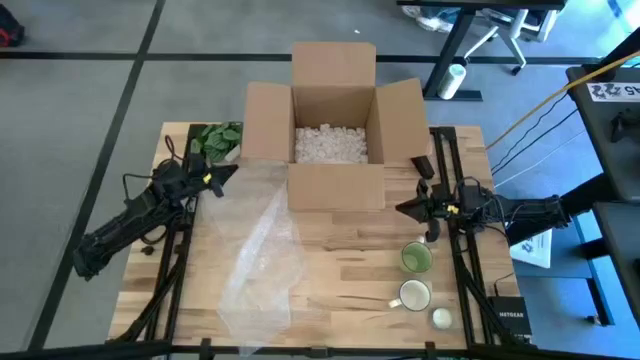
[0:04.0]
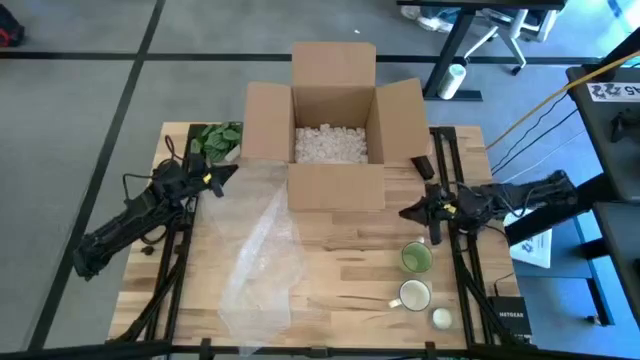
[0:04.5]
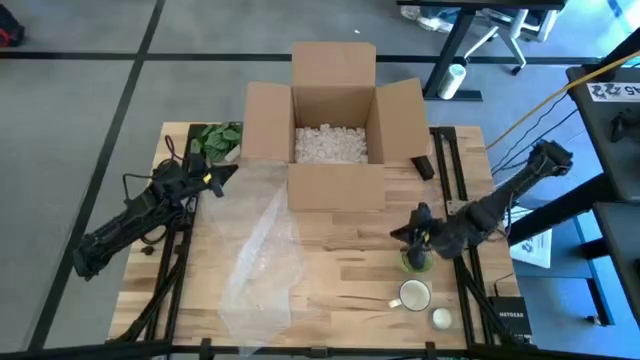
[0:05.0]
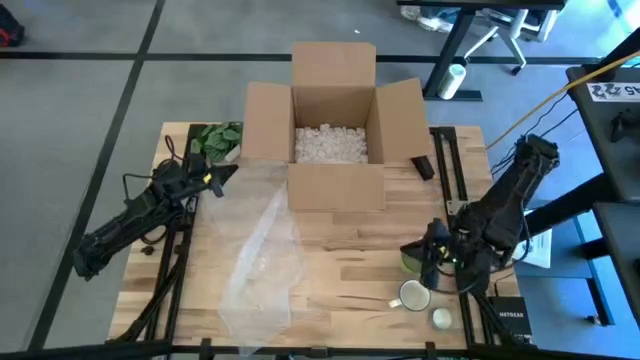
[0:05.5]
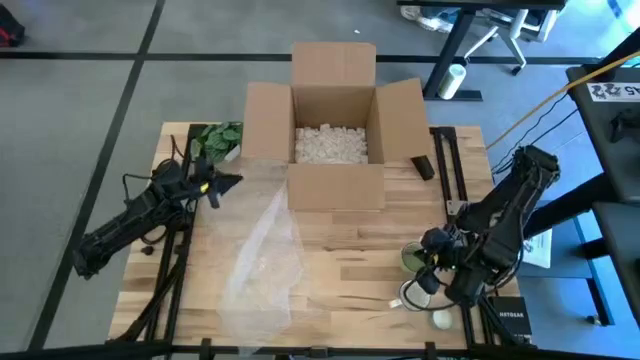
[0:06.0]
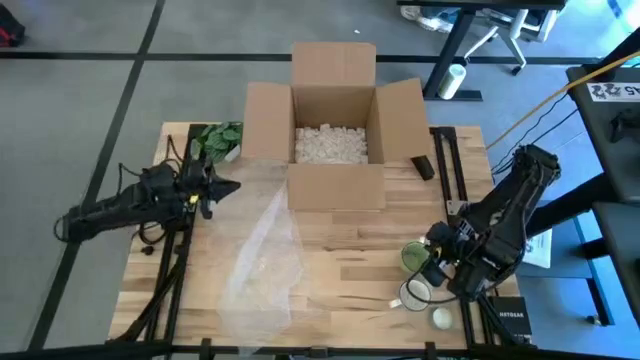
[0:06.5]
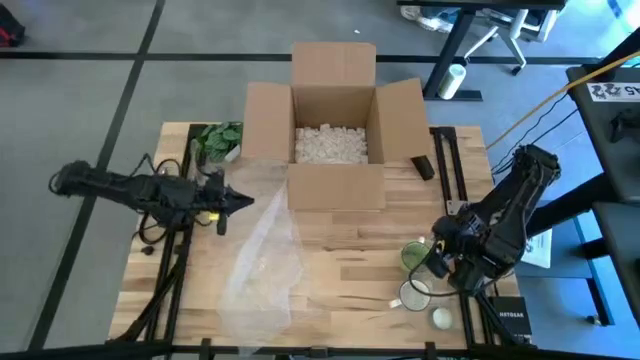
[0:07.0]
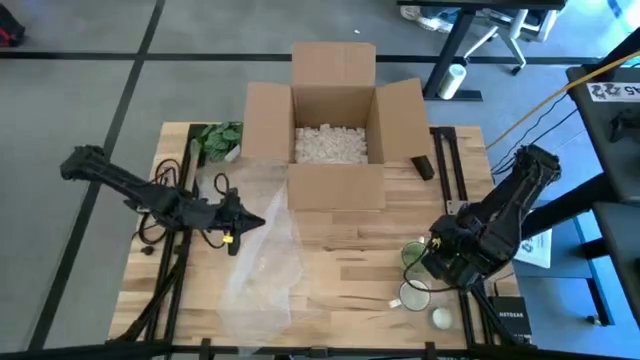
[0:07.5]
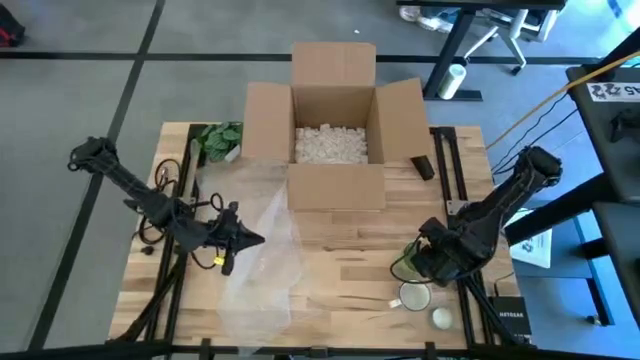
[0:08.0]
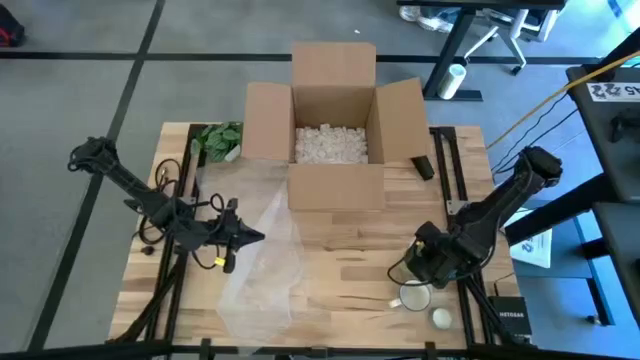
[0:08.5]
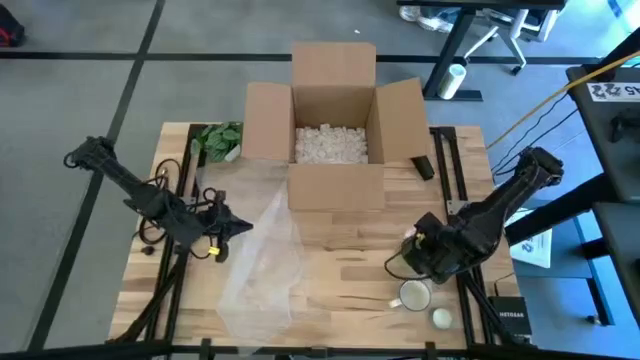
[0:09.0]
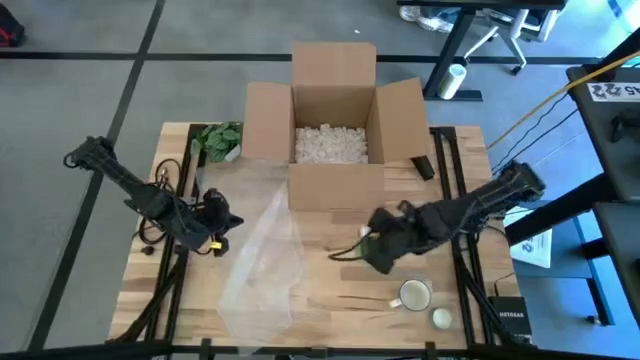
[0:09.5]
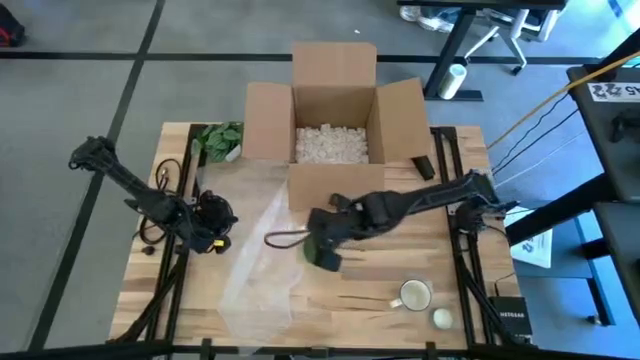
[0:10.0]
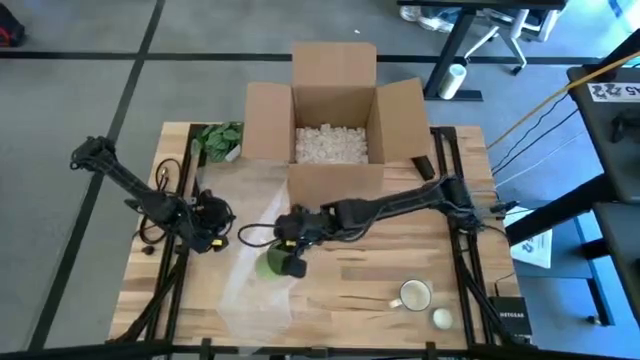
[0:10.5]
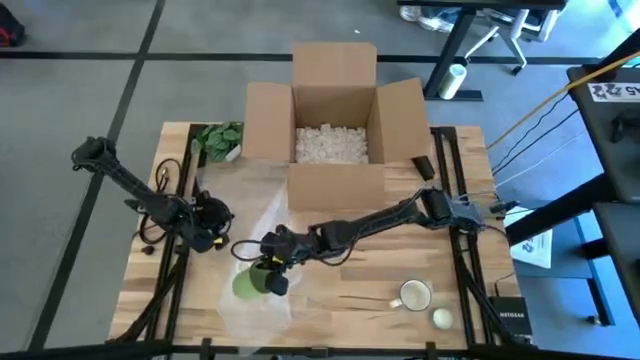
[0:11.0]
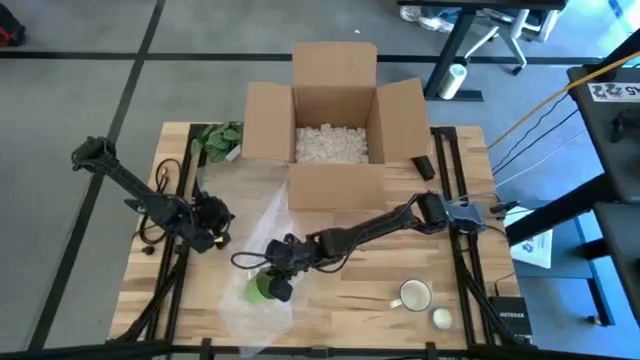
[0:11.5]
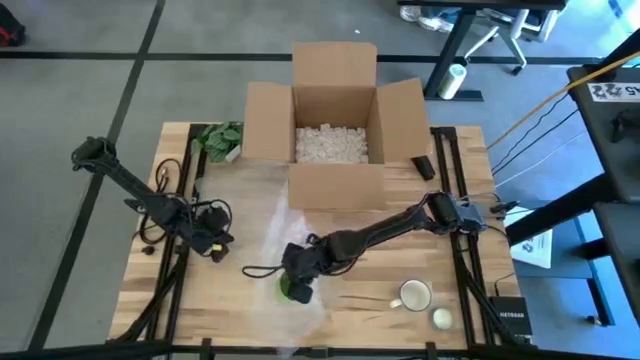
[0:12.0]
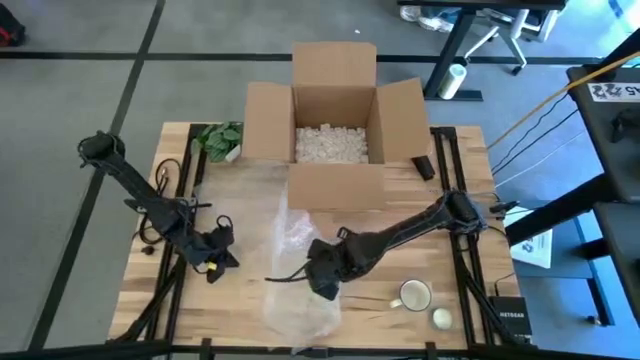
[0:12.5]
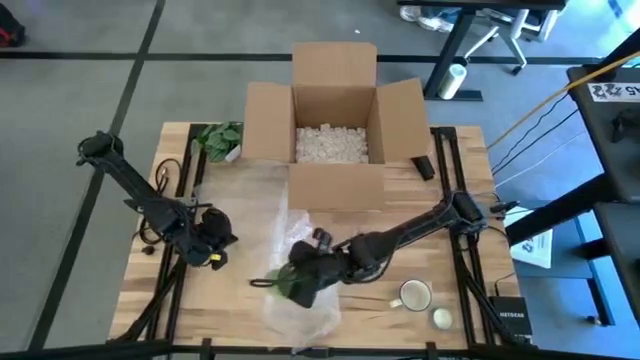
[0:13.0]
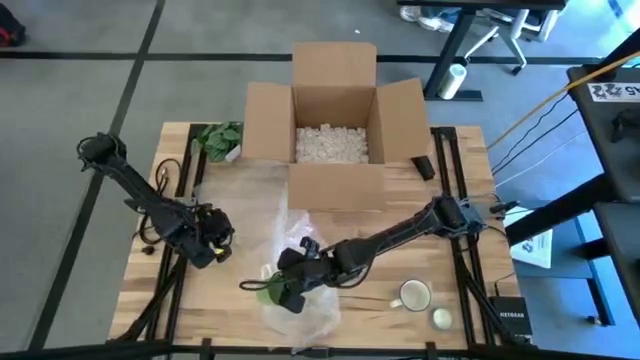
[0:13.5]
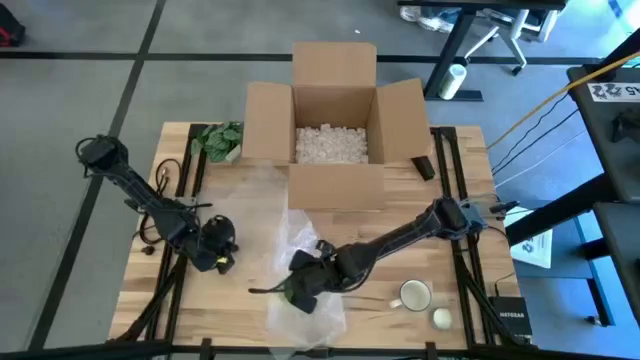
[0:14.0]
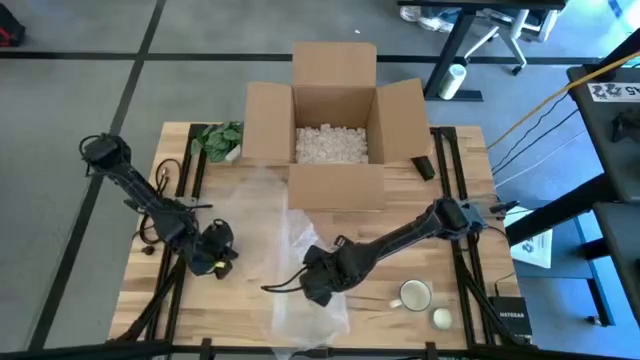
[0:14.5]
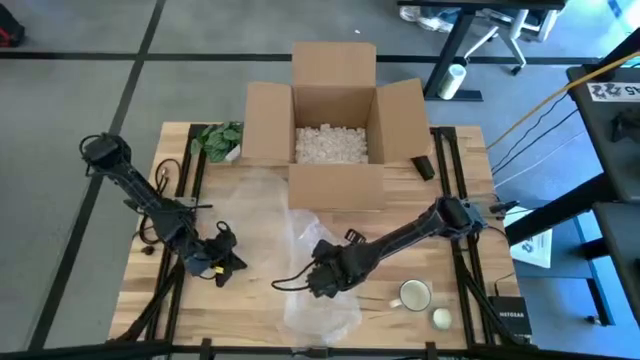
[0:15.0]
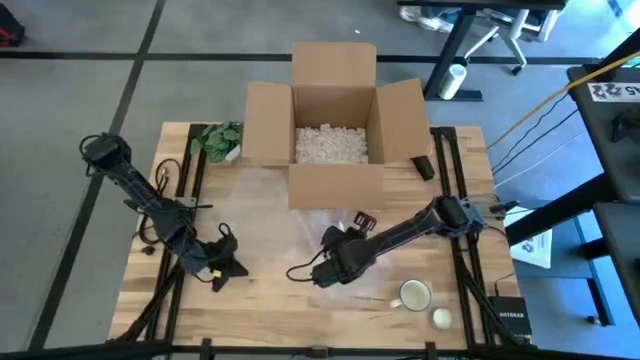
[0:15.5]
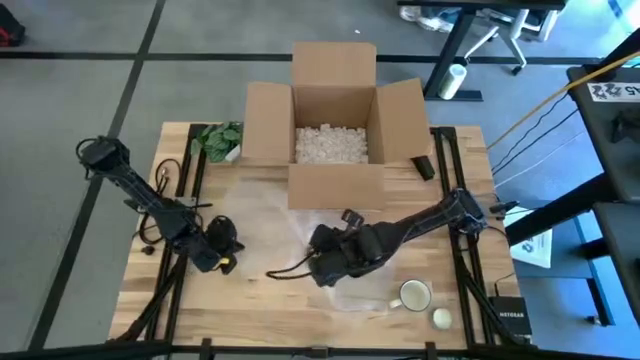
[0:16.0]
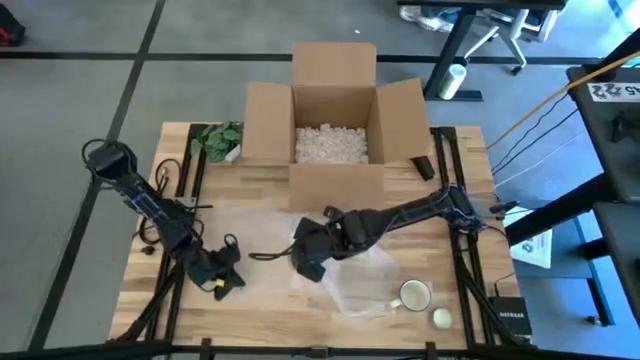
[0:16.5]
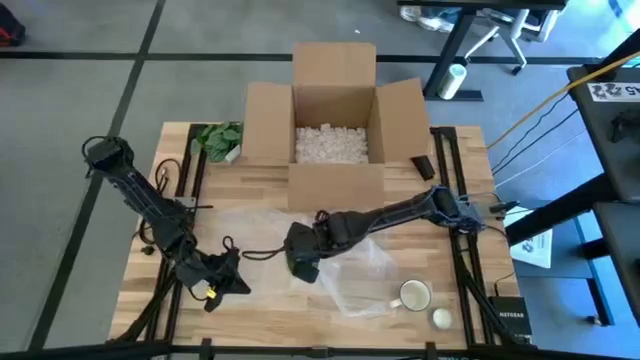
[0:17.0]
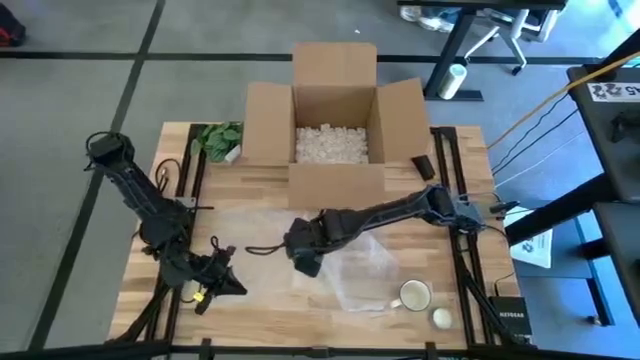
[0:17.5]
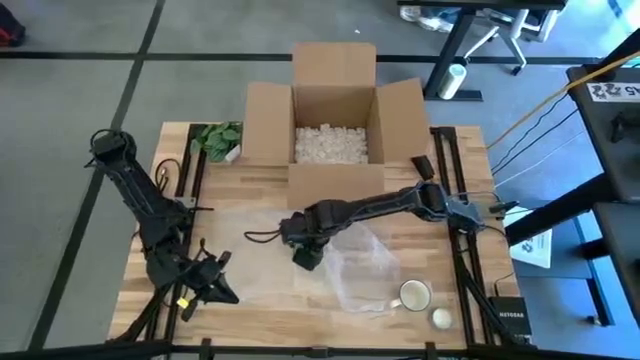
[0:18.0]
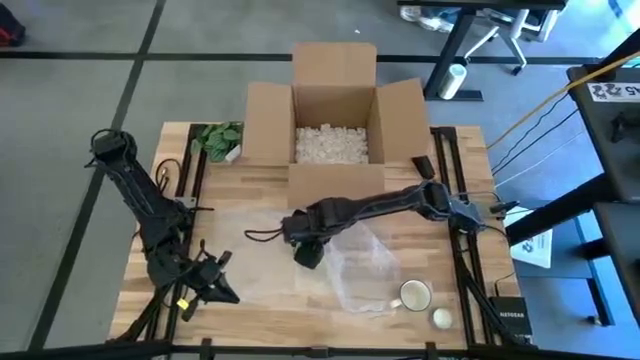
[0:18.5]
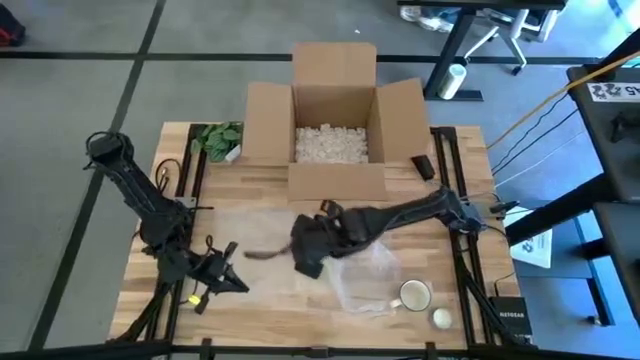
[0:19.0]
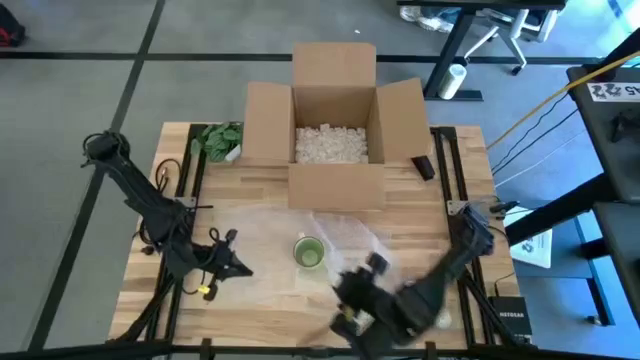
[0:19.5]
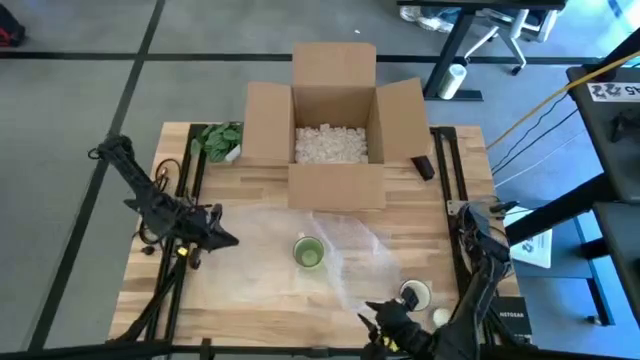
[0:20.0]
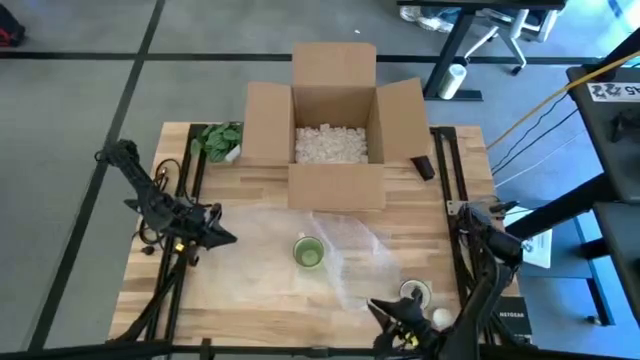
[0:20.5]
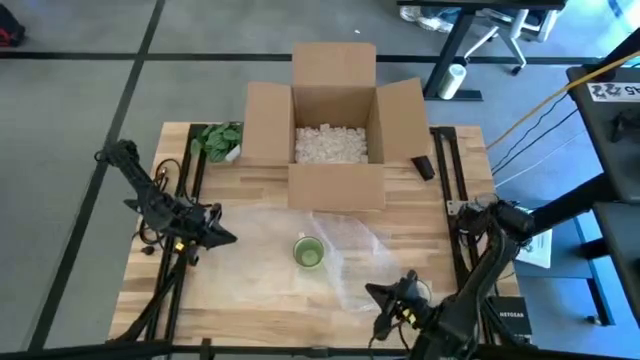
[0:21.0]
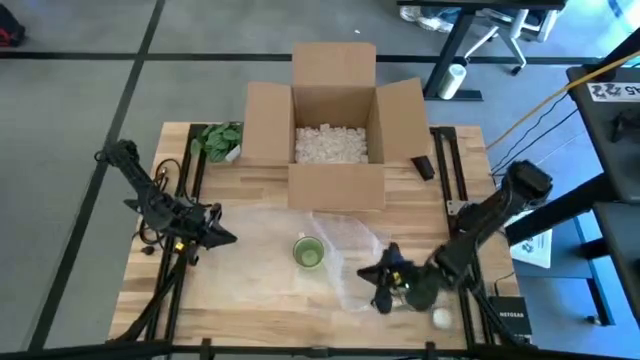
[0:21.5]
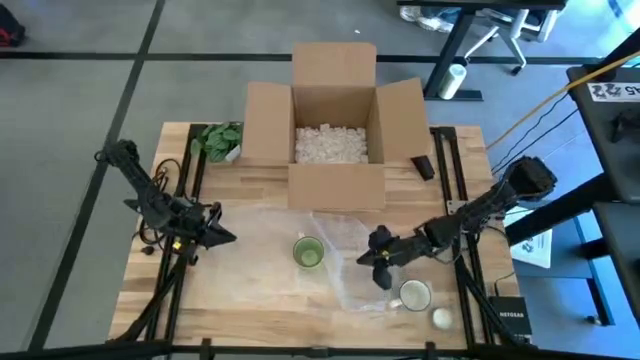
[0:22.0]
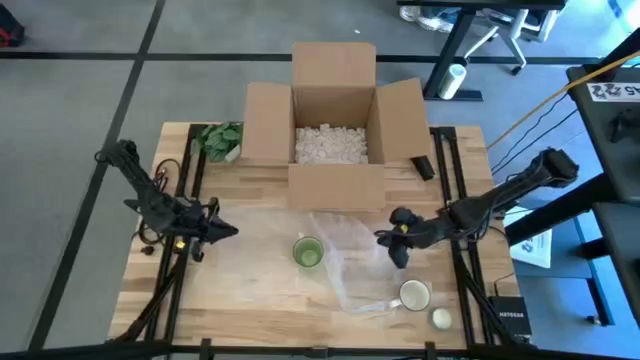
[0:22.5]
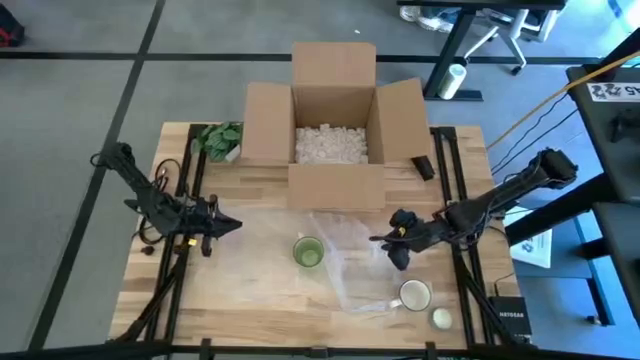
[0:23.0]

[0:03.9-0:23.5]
Task: wrap mug
Wrap the green mug with the bubble wrap

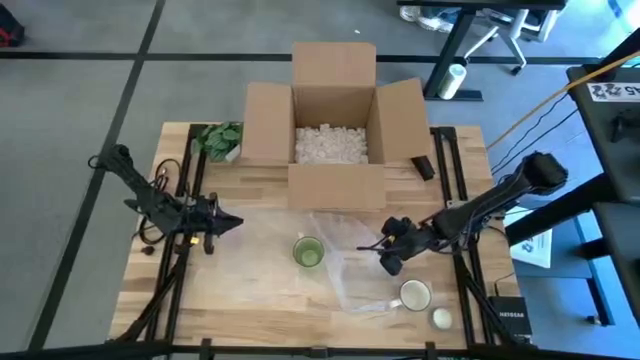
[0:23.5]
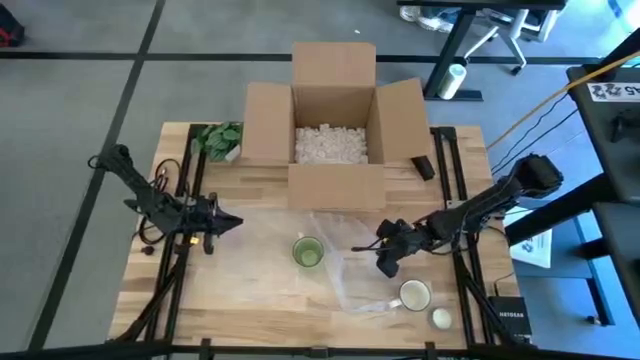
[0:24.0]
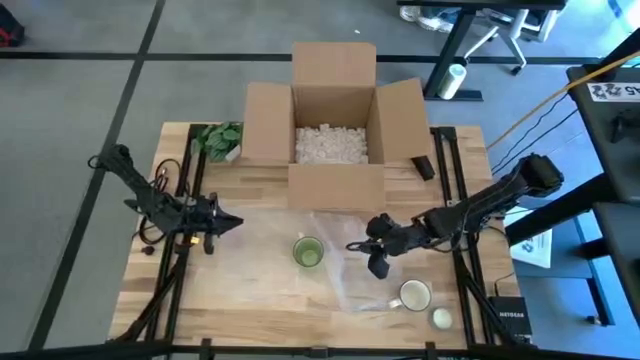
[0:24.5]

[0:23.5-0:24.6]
Wrap the green mug with the bubble wrap
